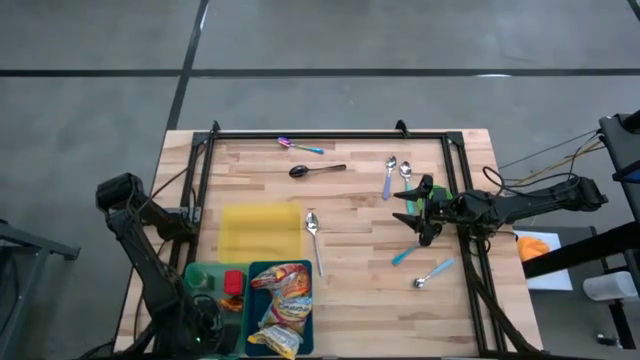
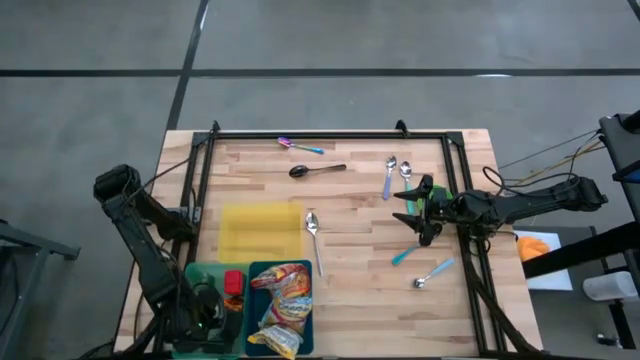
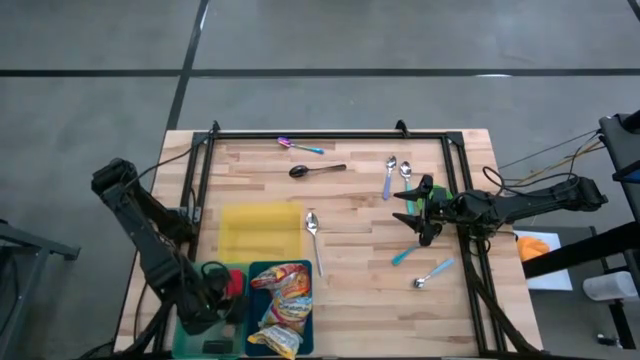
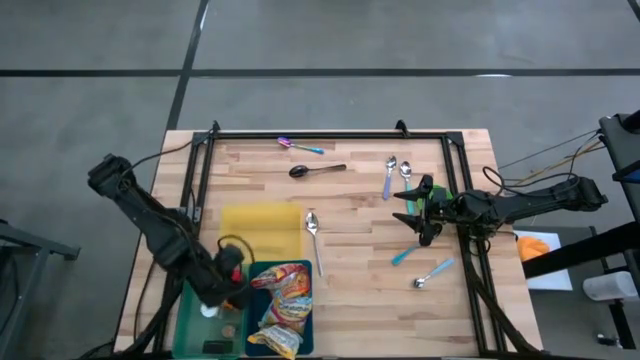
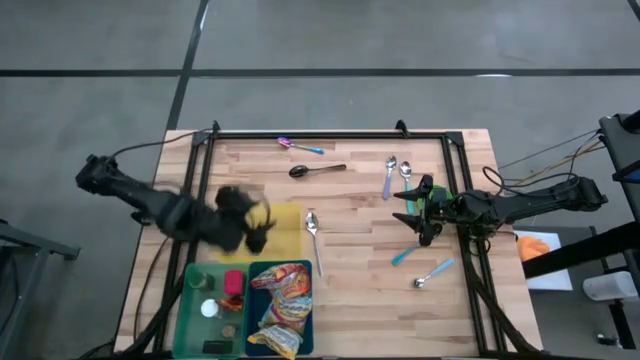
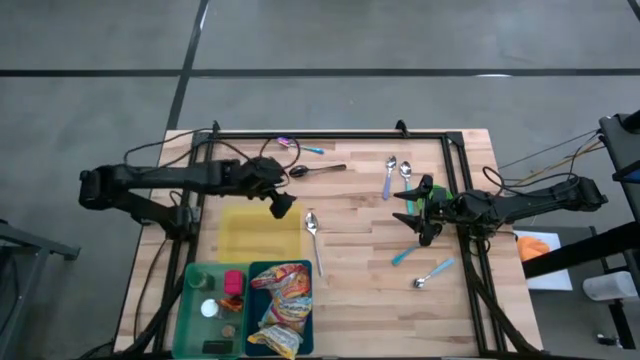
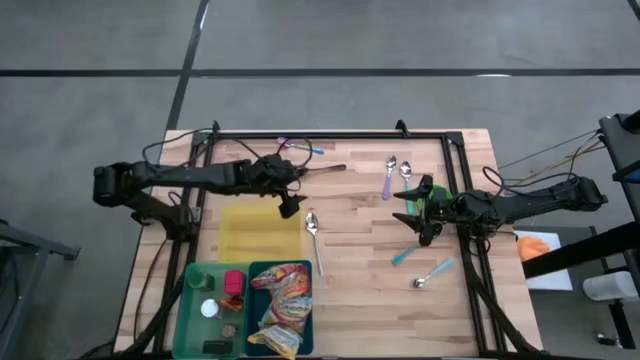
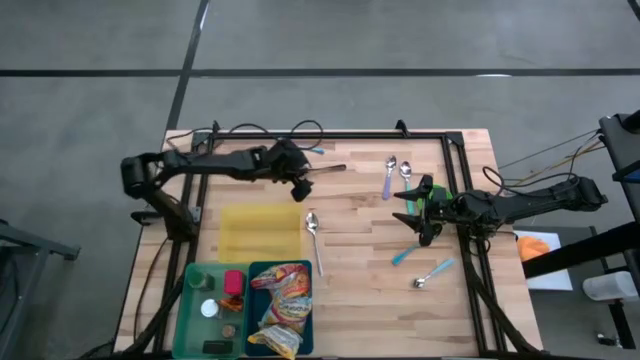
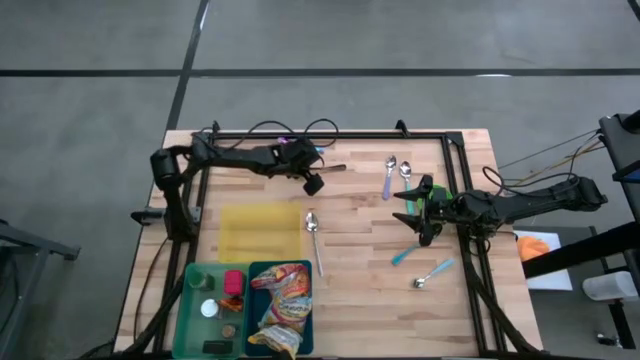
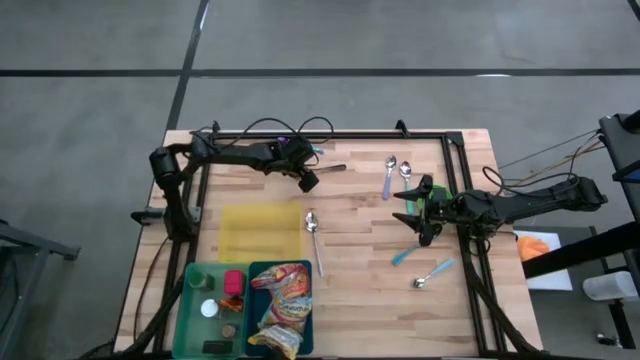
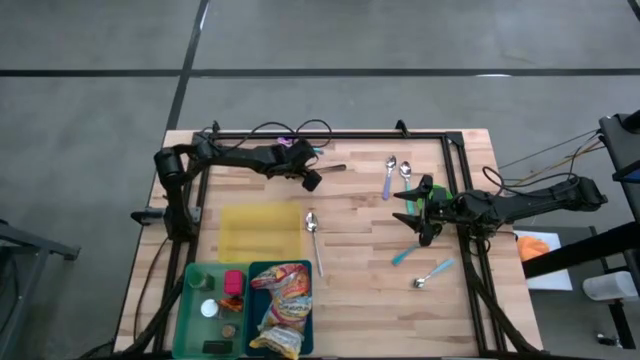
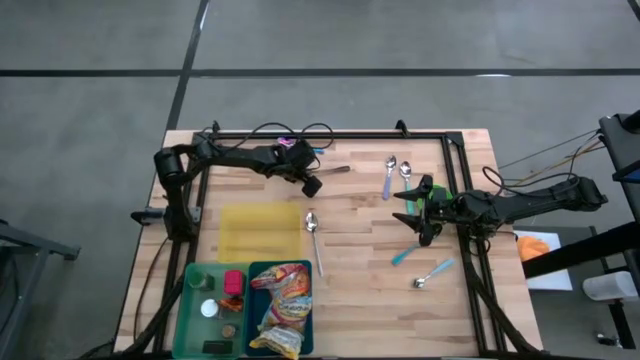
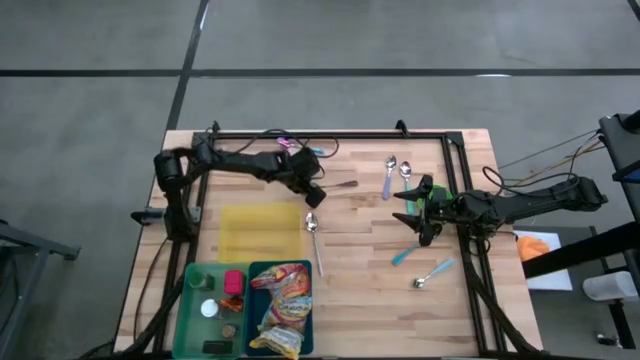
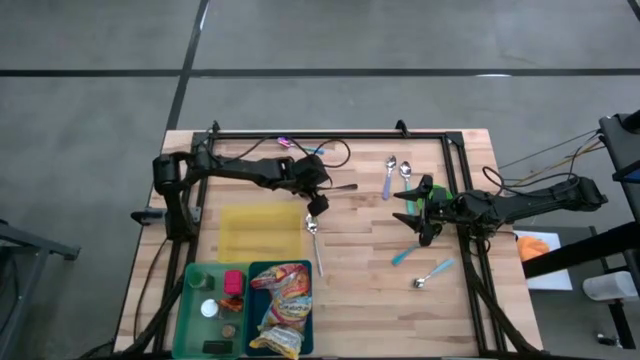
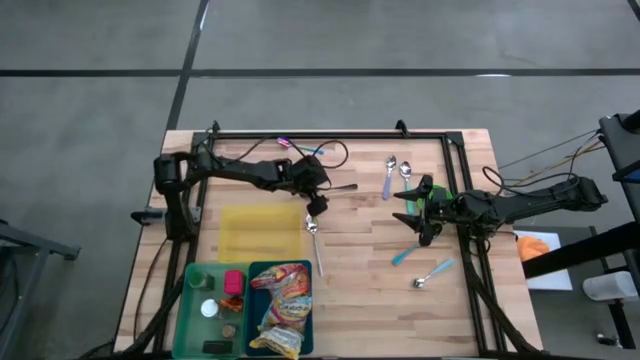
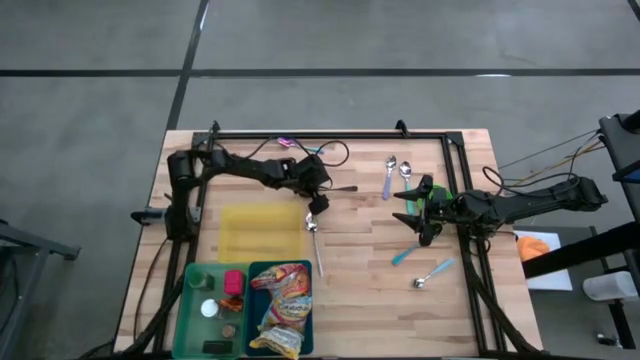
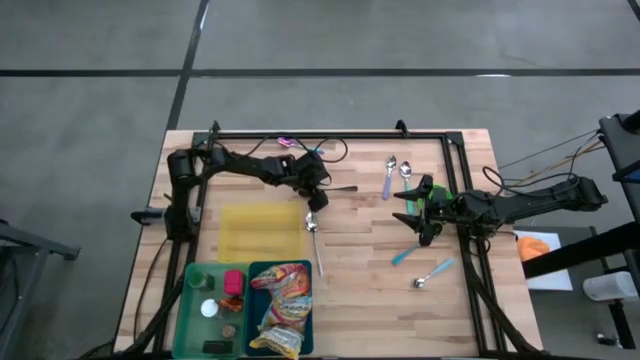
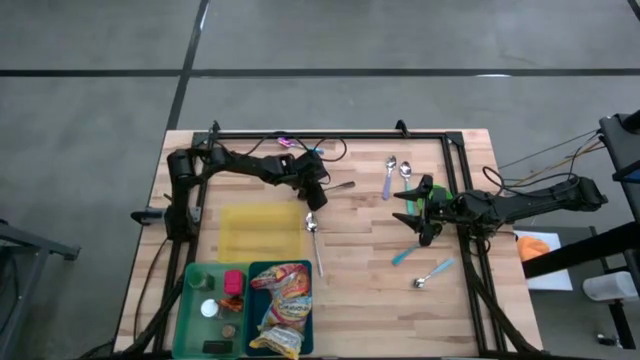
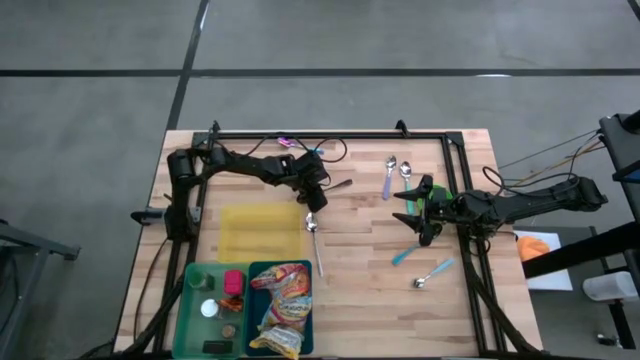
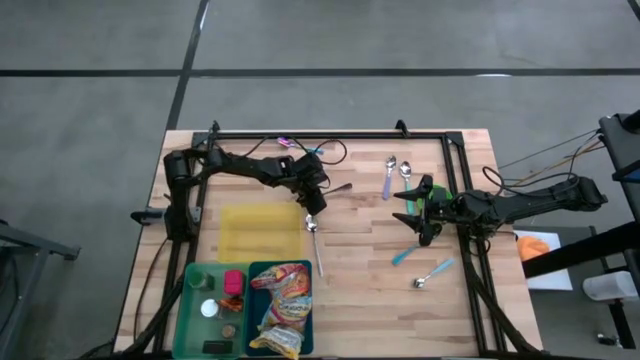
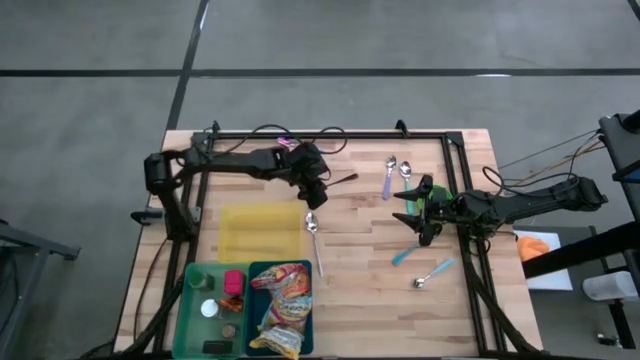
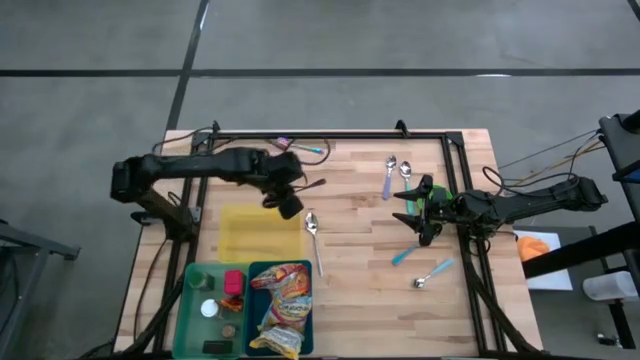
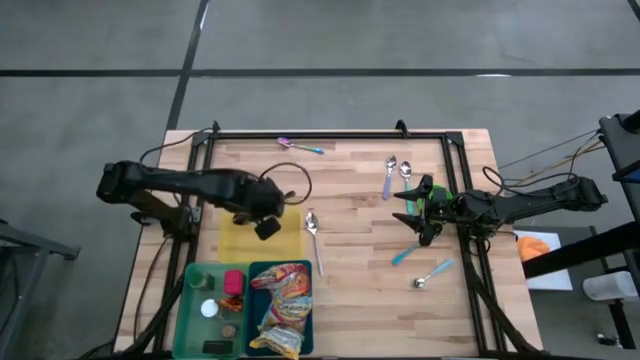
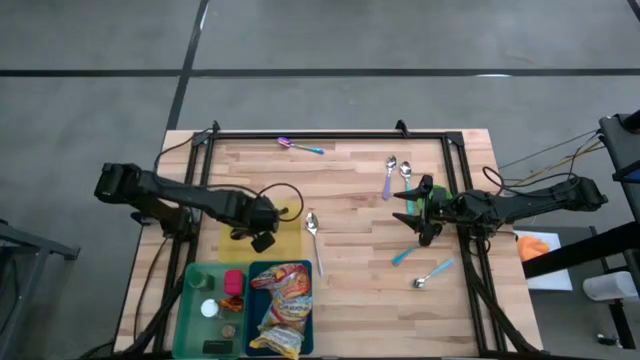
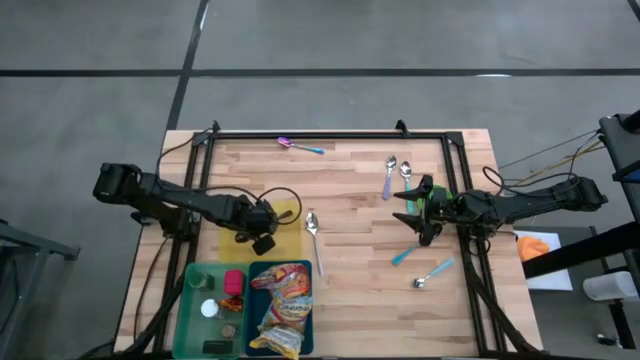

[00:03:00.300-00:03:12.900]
Put the black spoon into the yellow bin

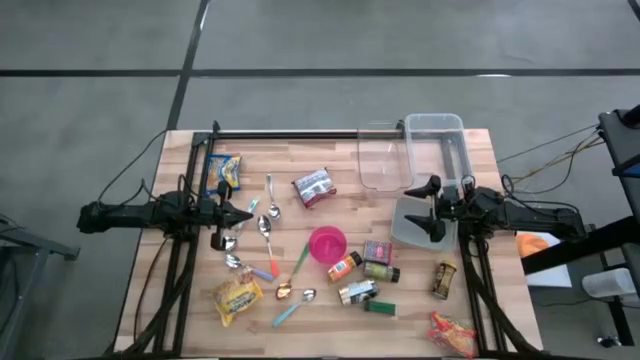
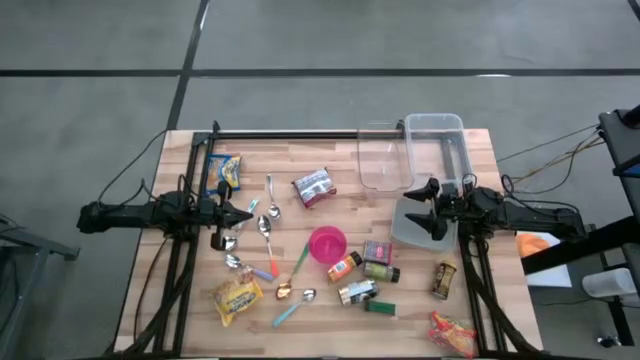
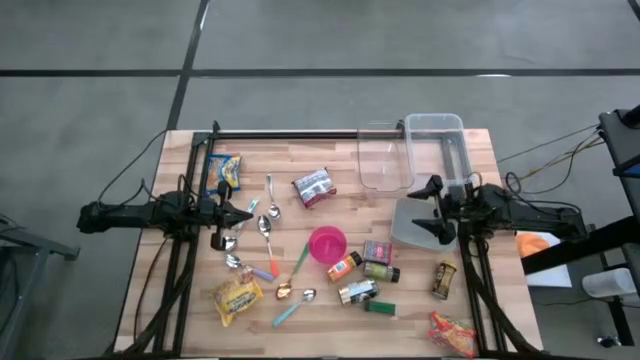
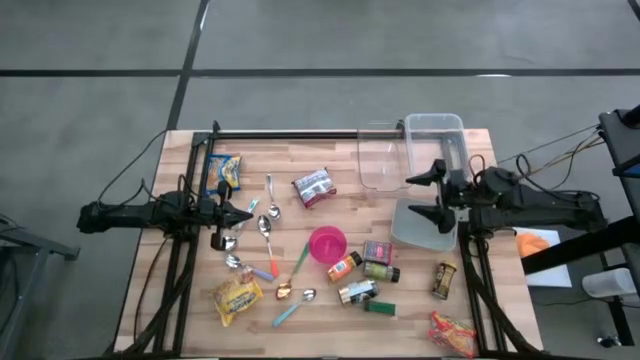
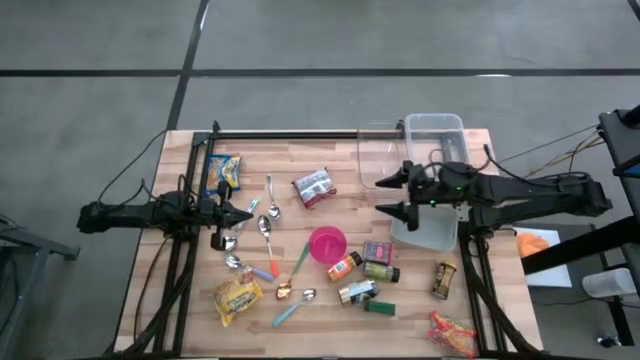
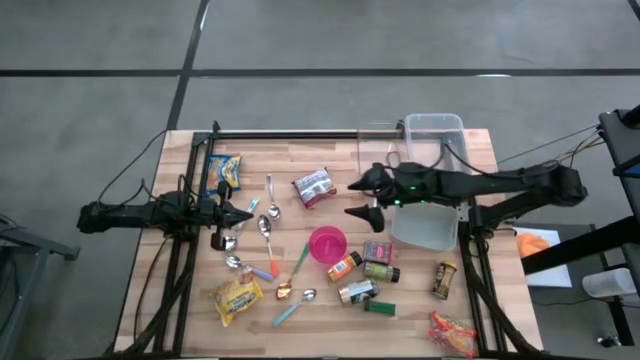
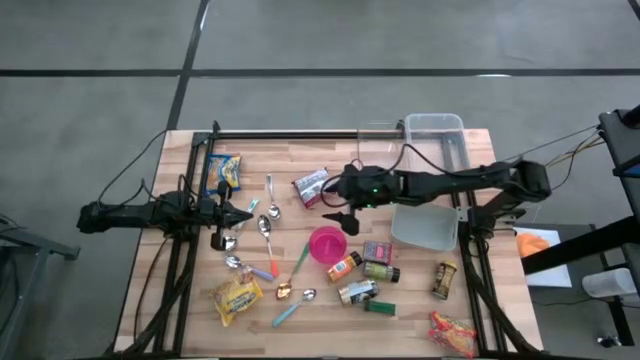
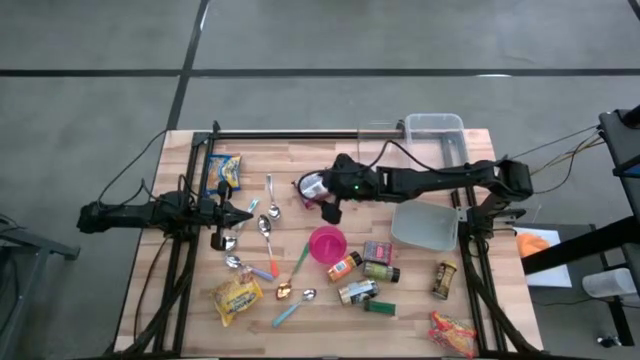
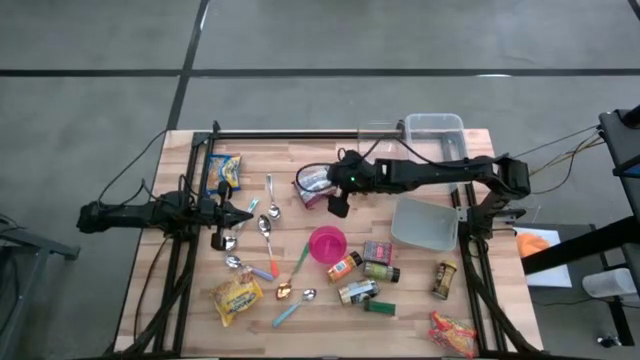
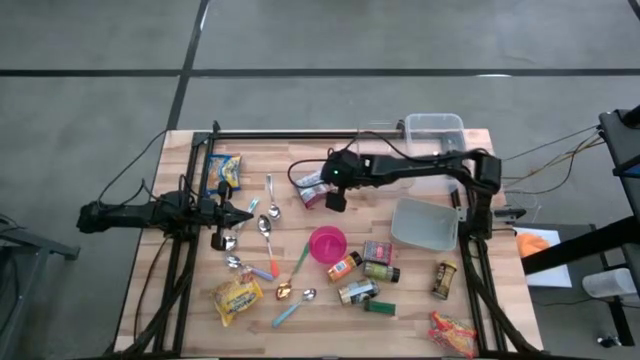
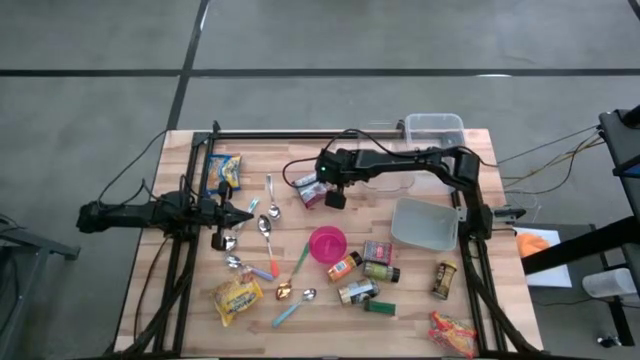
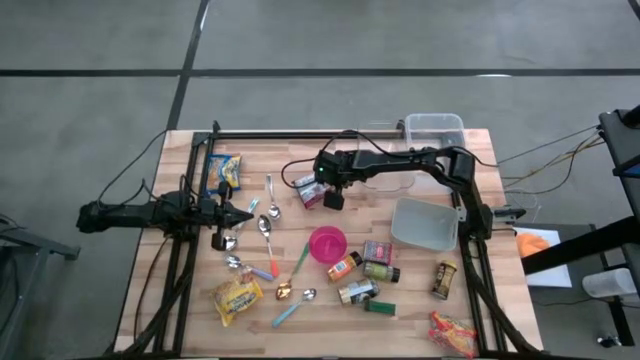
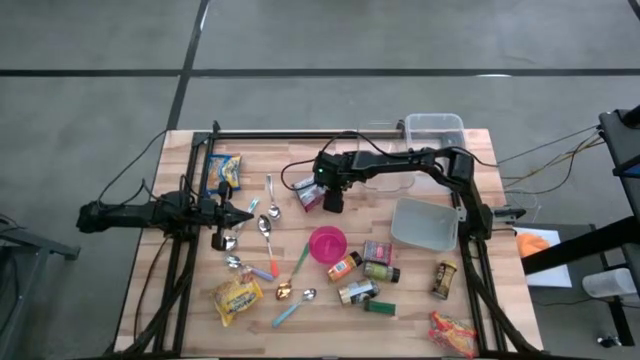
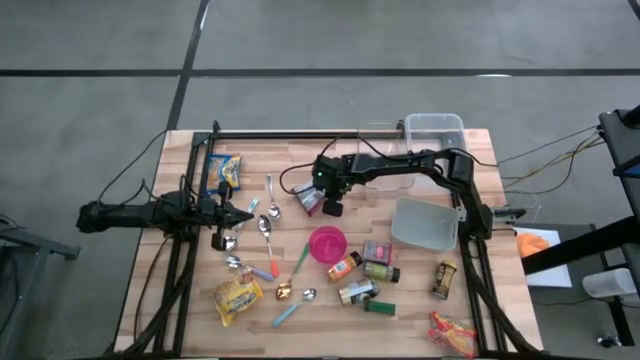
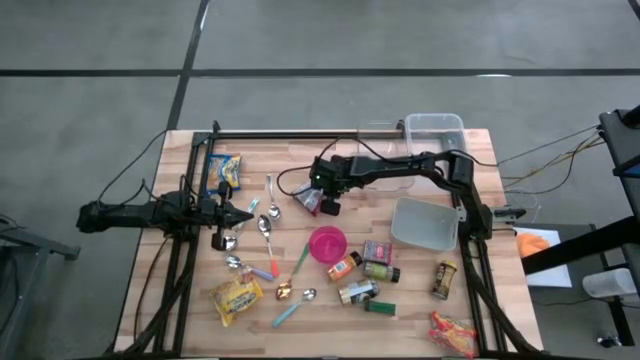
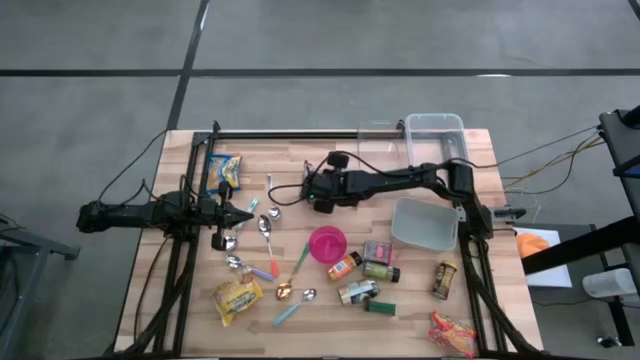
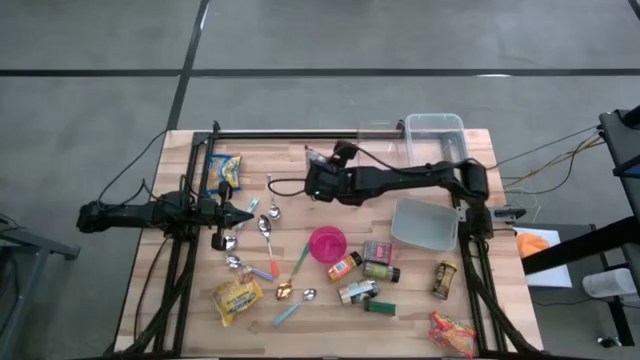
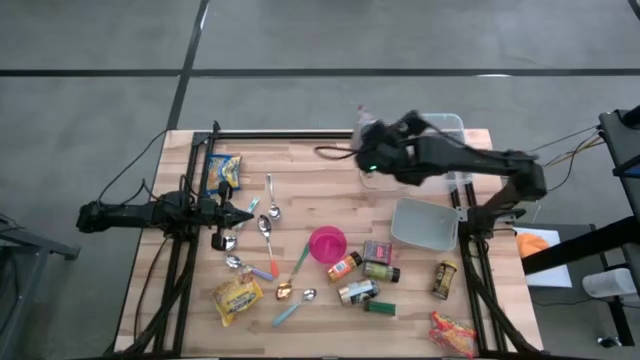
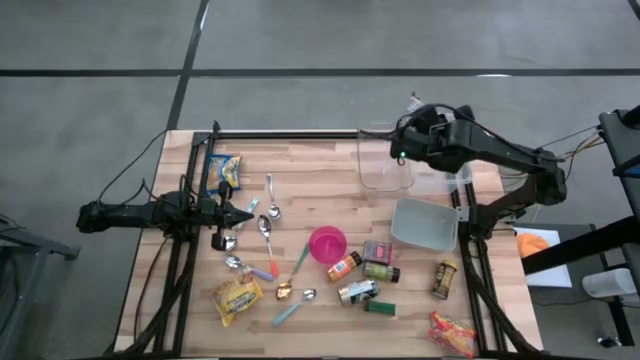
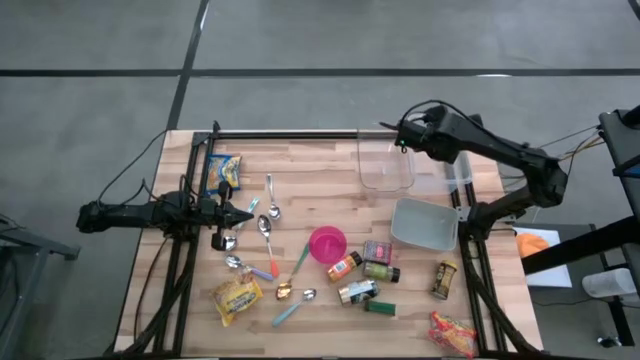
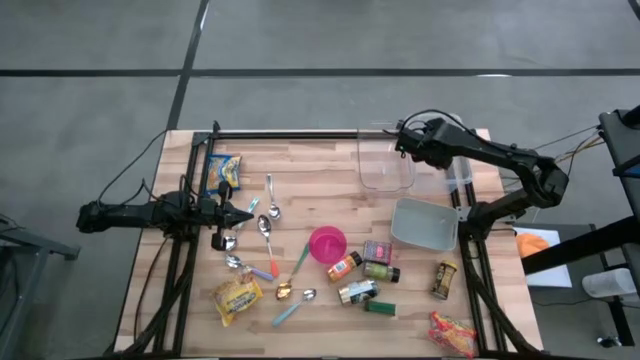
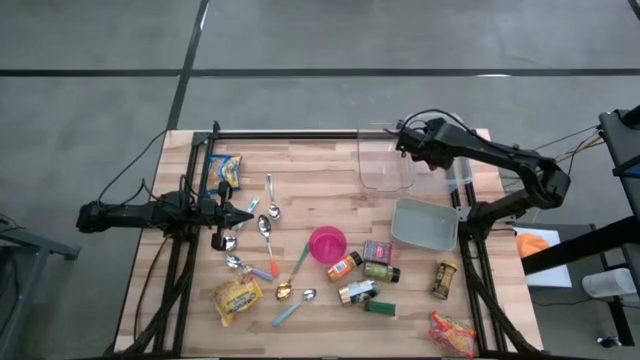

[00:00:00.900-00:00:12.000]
Put the red noodle pack into the white bin
